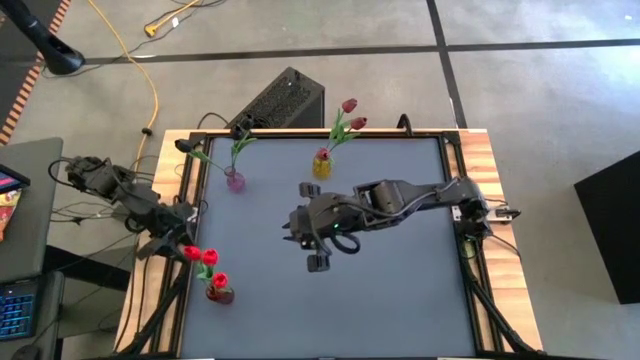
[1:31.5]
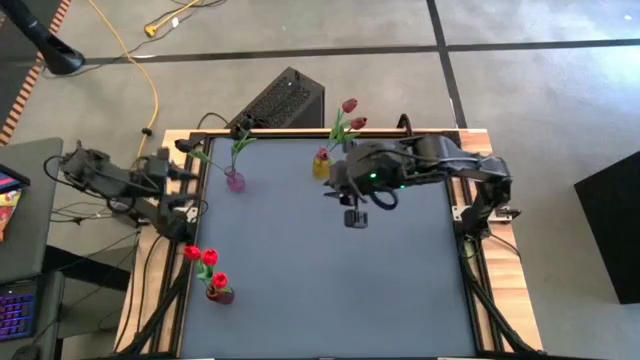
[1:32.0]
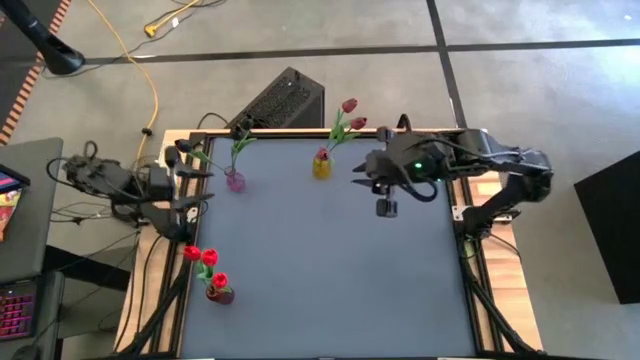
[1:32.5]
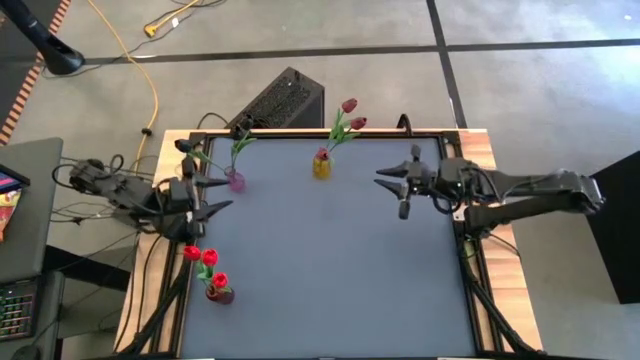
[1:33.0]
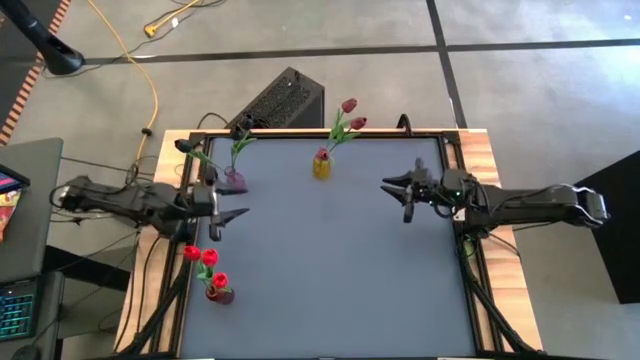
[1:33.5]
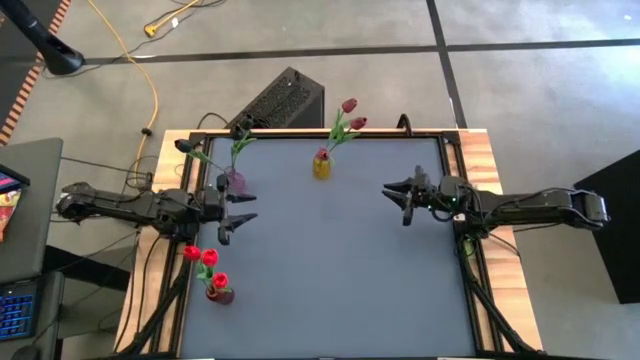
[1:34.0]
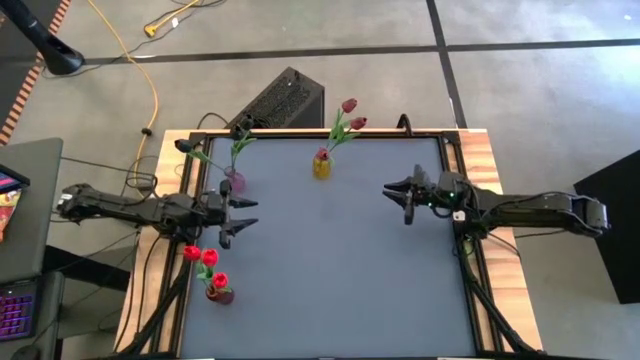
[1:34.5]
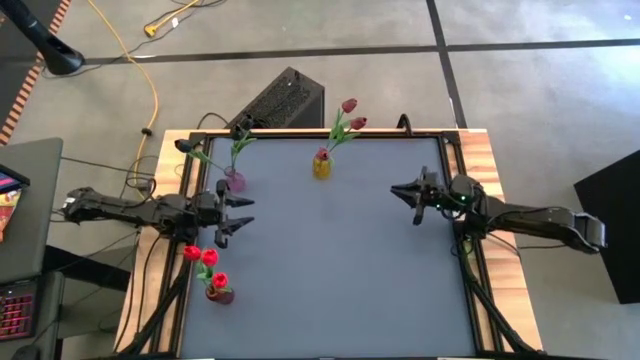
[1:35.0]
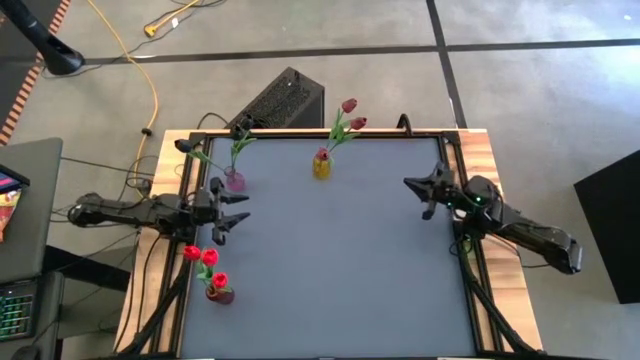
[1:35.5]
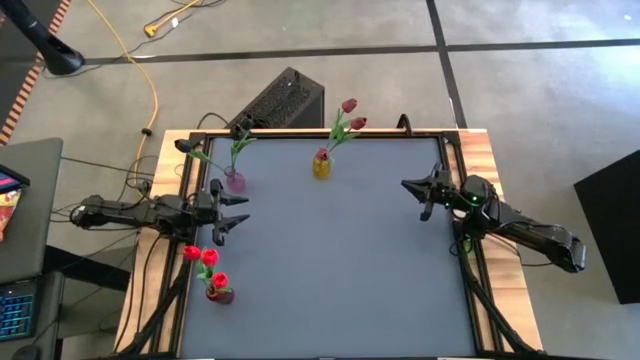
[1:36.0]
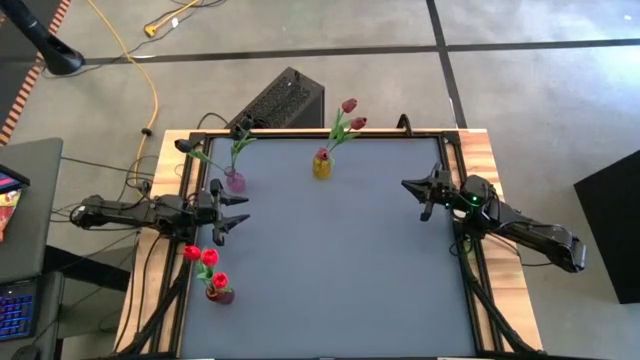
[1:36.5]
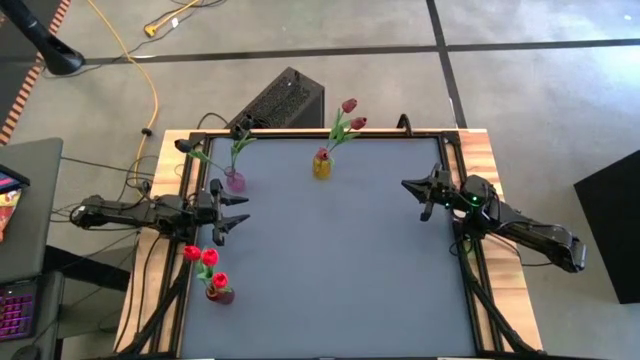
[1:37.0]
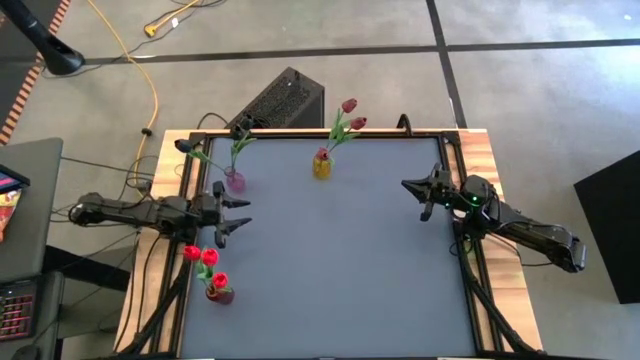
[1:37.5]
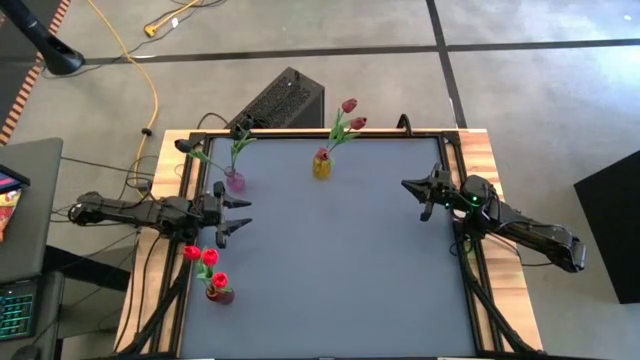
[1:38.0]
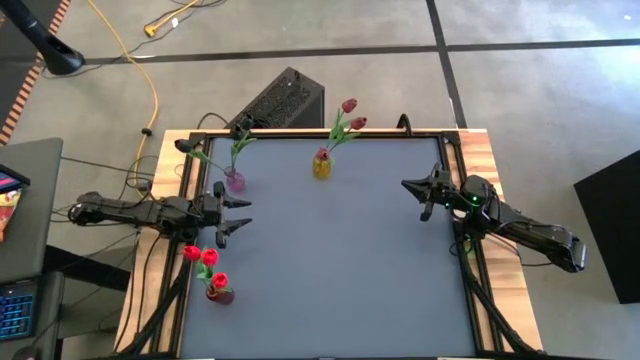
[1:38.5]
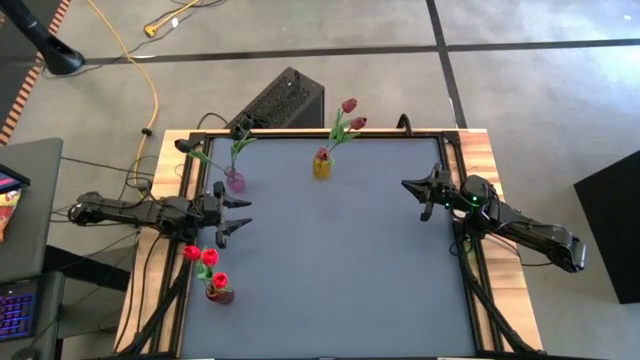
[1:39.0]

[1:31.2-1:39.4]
Task: Sort flowers into vase by color
Return to Home Position

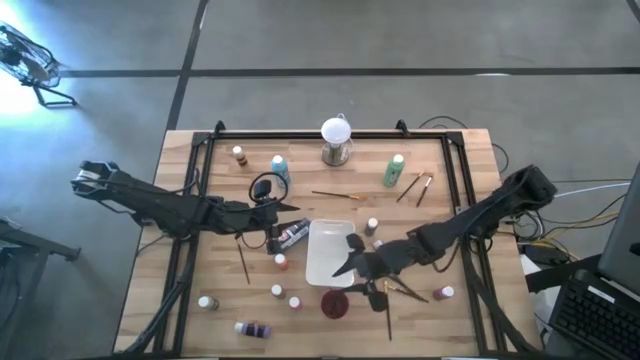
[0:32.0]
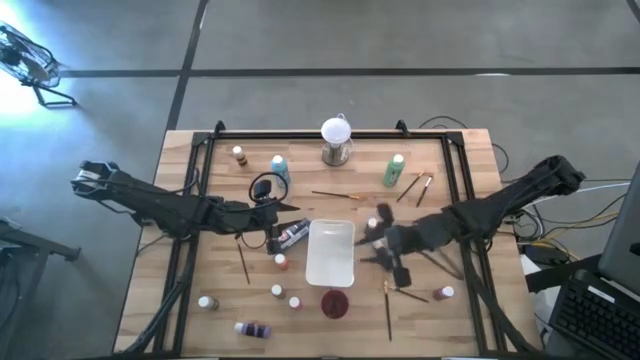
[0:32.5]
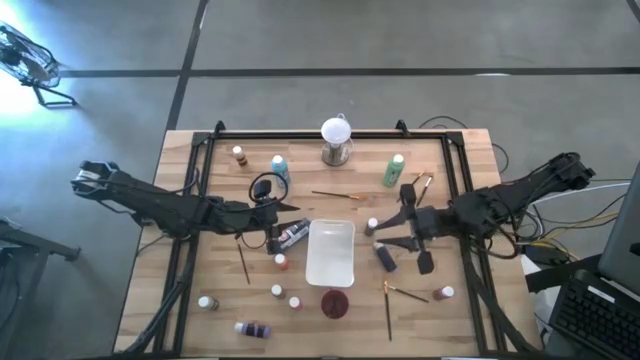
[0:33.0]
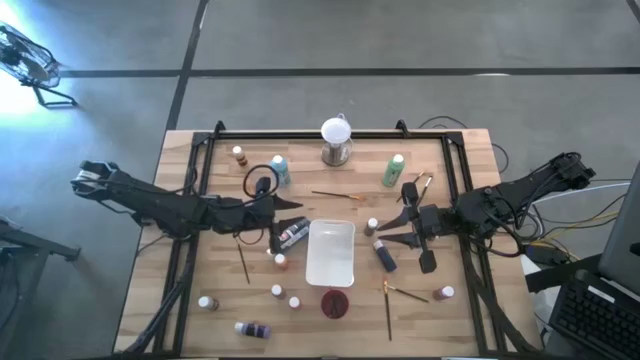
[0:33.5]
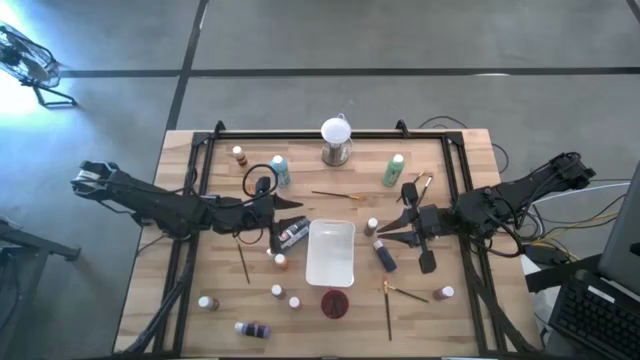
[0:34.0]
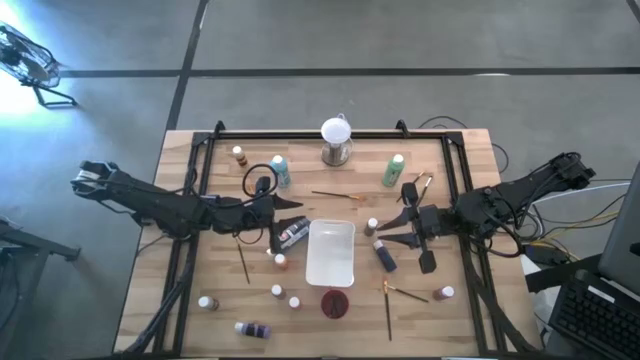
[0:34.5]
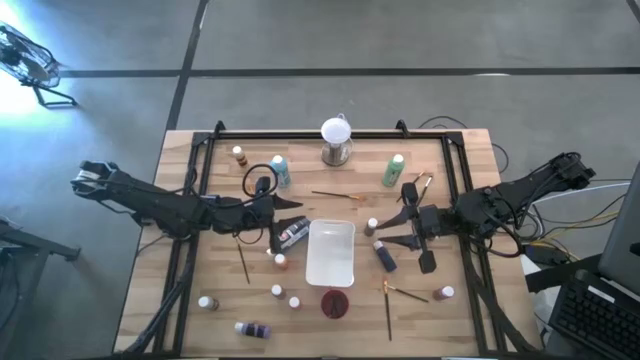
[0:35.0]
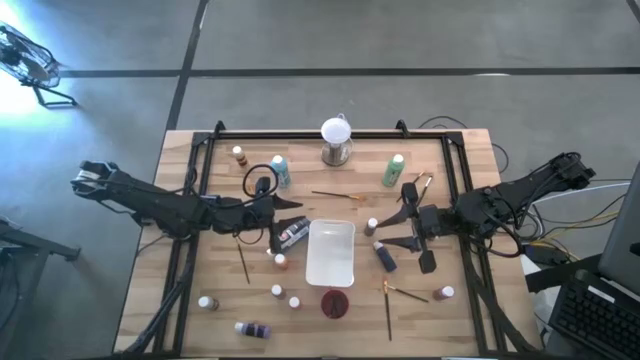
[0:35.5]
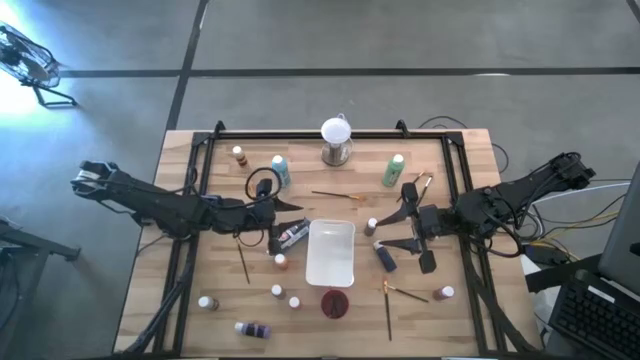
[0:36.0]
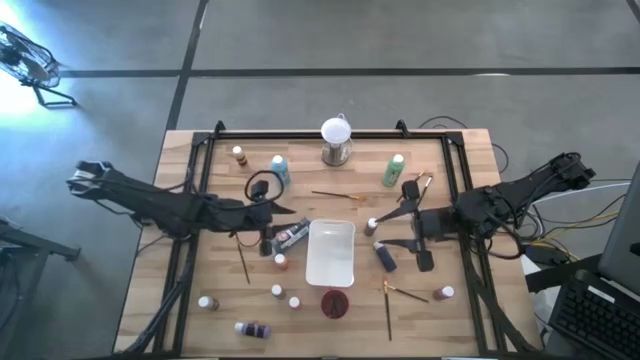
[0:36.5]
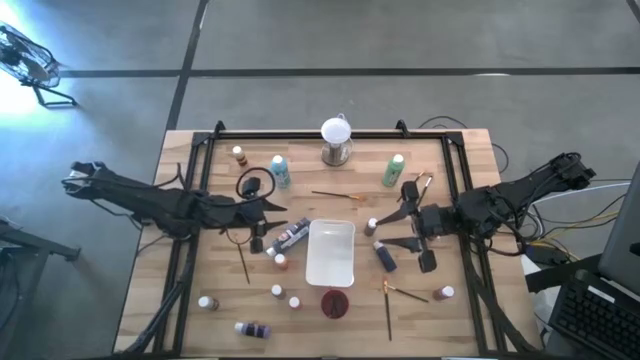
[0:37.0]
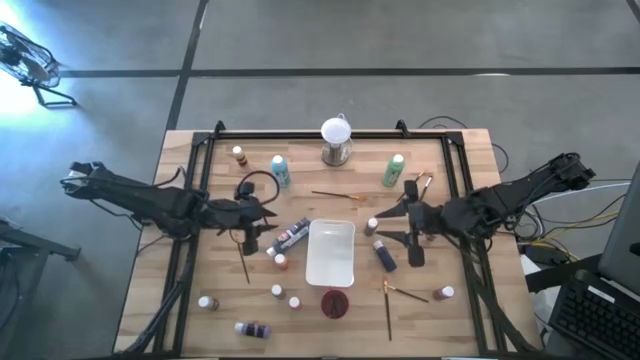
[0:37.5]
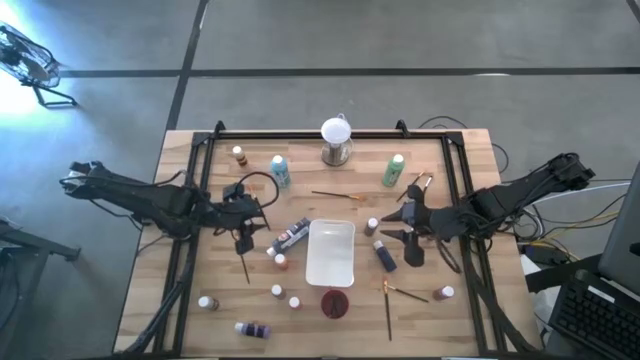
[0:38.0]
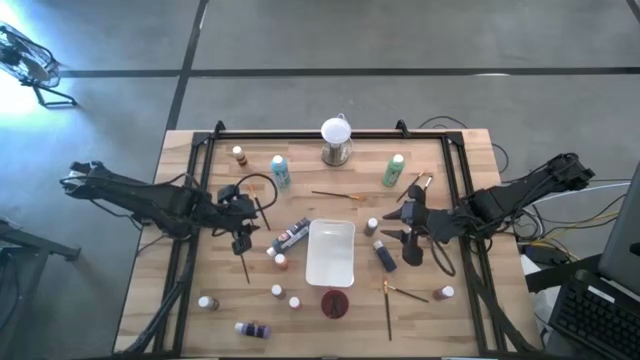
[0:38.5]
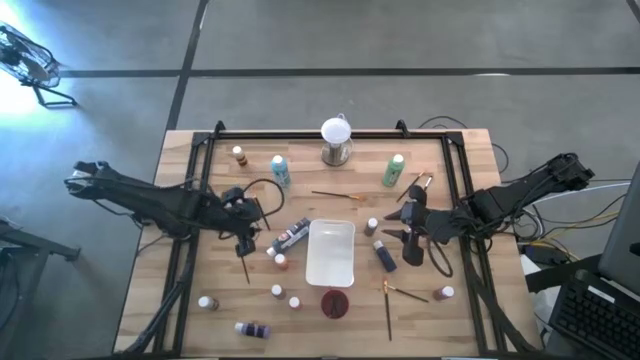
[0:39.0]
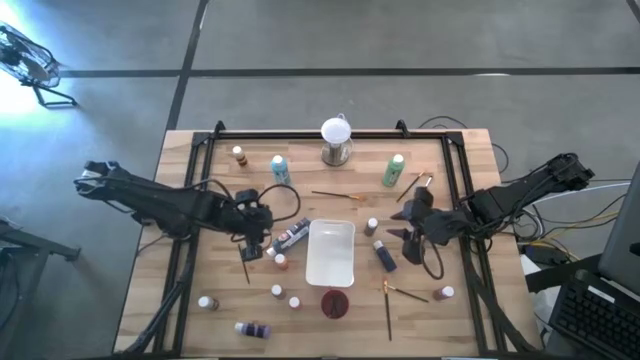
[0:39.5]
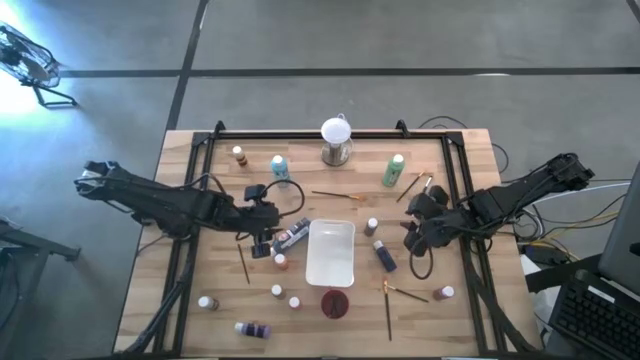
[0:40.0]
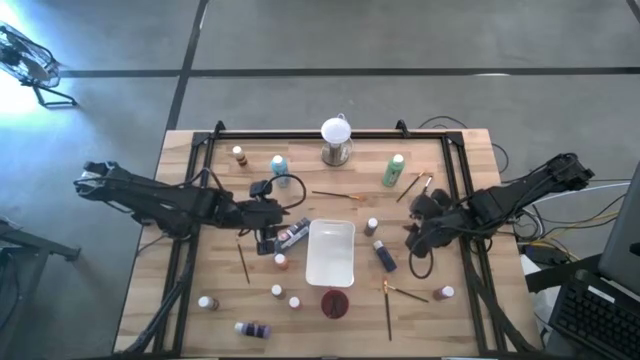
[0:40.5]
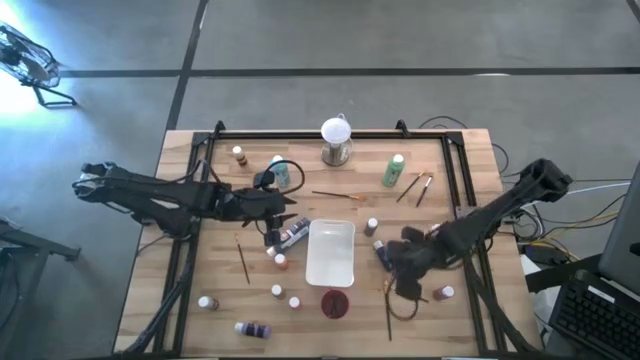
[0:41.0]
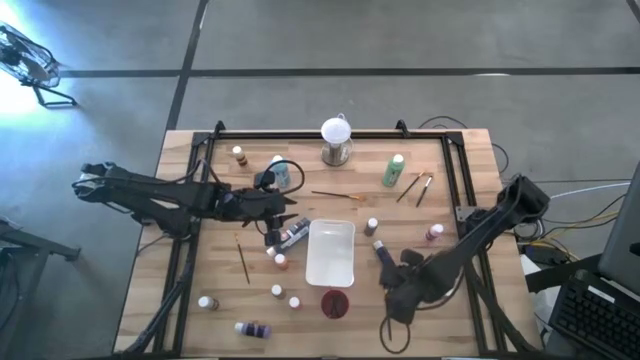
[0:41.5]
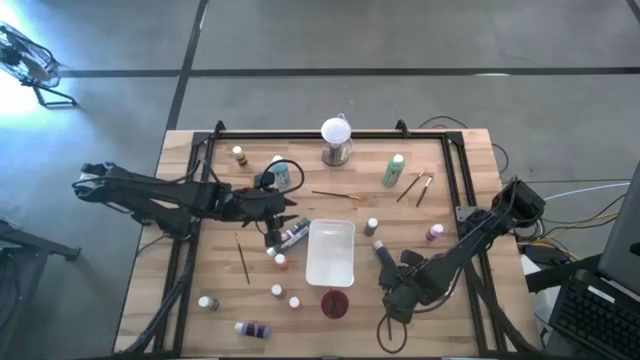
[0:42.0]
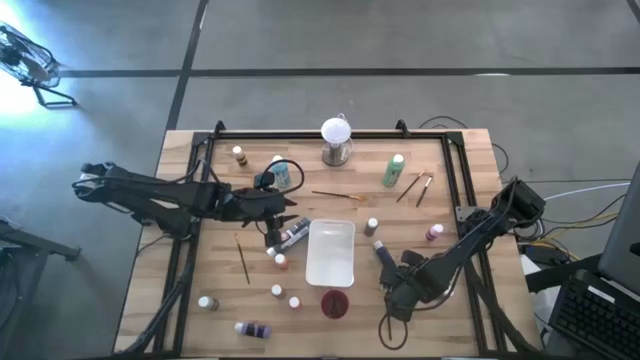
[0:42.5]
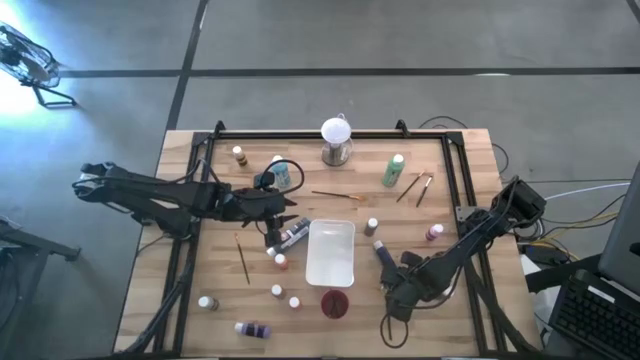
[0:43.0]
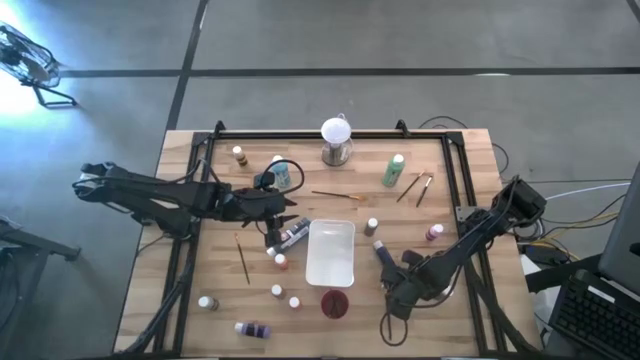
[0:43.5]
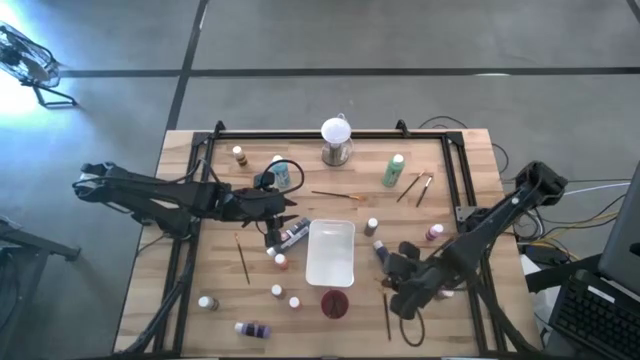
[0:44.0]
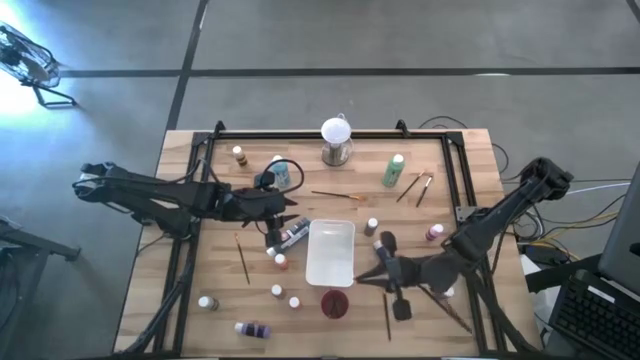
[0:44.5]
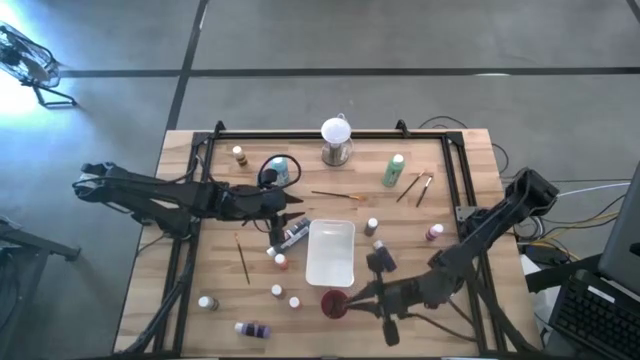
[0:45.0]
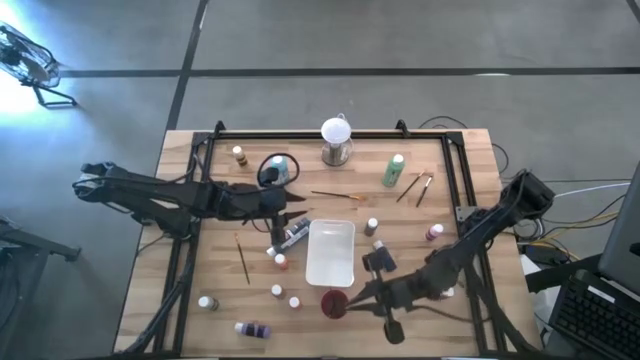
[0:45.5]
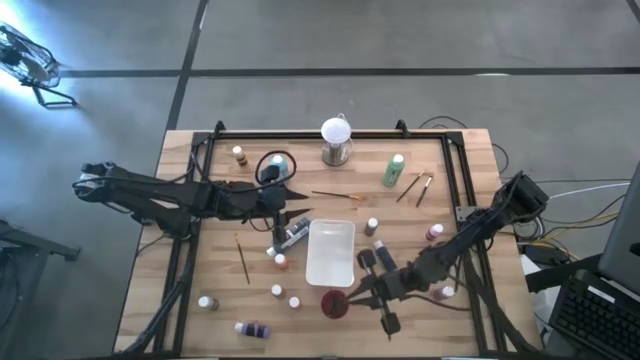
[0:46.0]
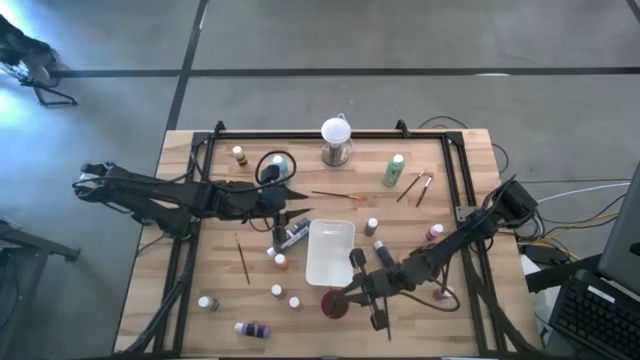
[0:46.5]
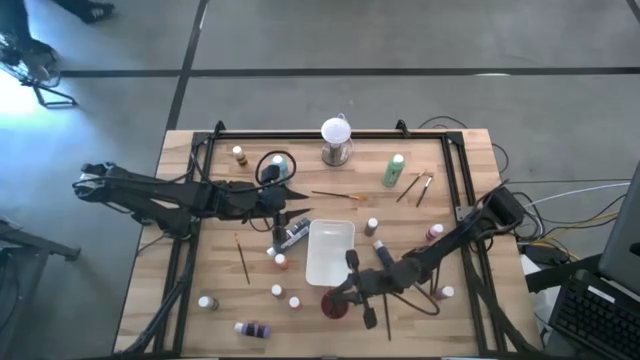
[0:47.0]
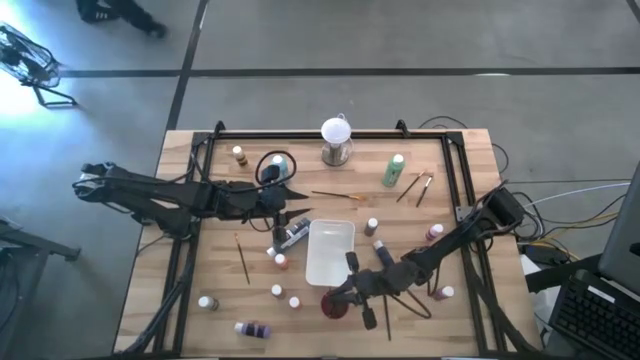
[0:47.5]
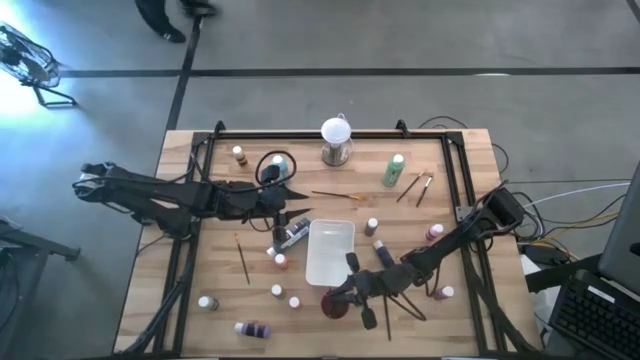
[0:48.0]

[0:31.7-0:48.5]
Task: Pick & Place Paint Supplies
Put the silver paint brush into the red cup
